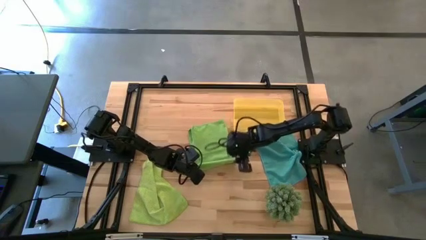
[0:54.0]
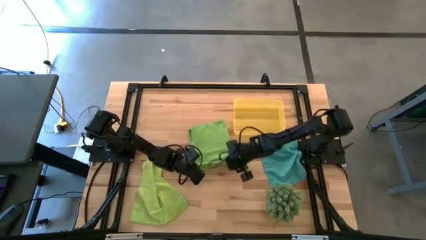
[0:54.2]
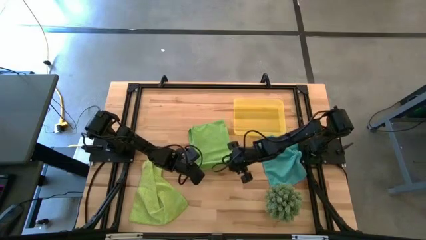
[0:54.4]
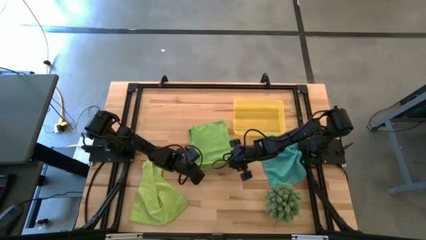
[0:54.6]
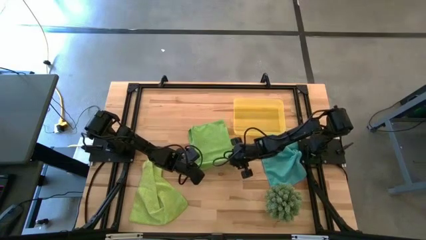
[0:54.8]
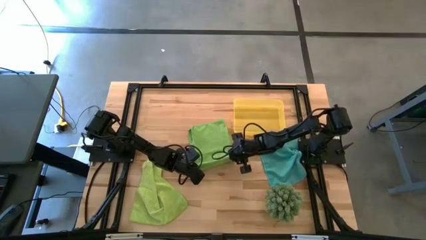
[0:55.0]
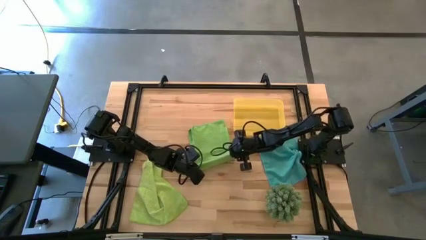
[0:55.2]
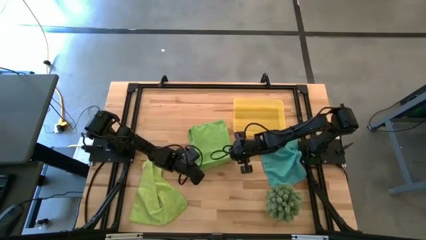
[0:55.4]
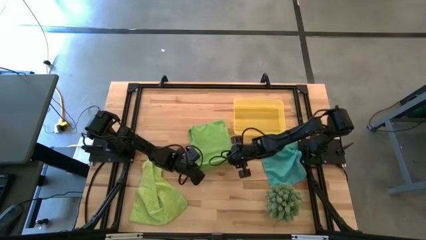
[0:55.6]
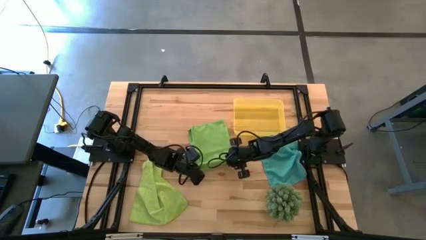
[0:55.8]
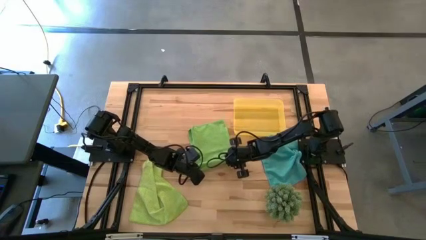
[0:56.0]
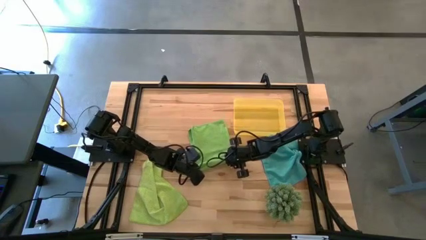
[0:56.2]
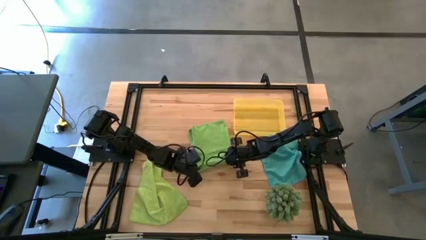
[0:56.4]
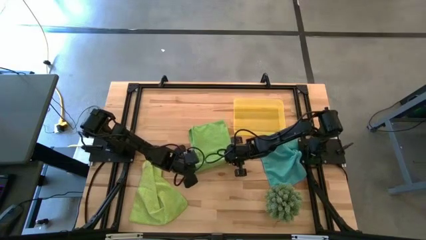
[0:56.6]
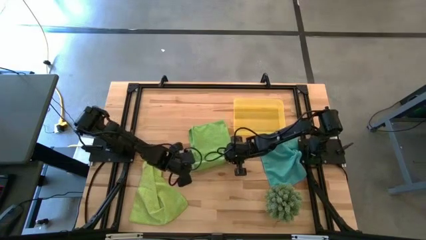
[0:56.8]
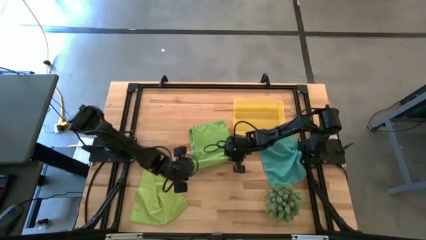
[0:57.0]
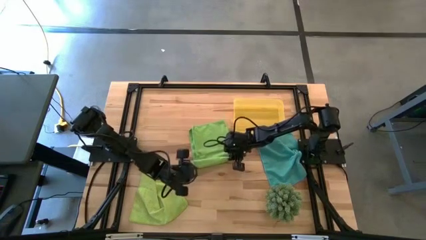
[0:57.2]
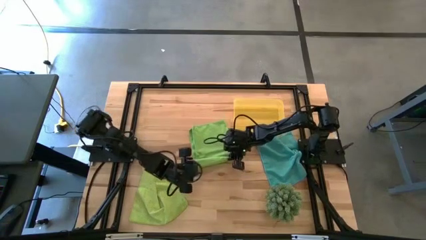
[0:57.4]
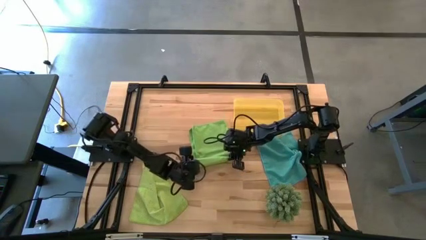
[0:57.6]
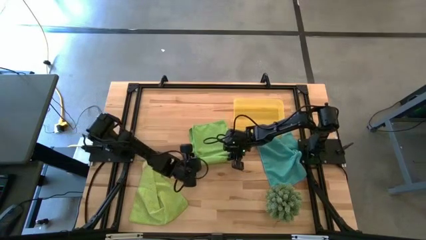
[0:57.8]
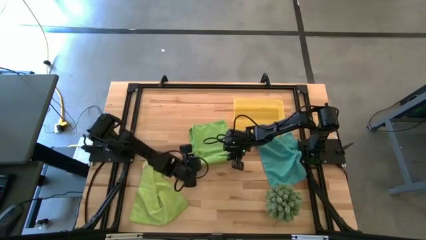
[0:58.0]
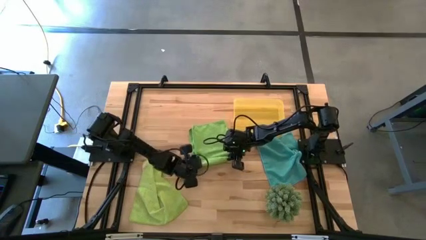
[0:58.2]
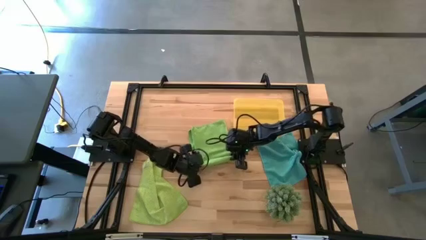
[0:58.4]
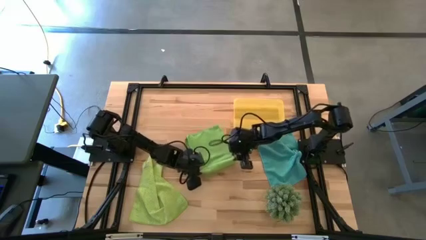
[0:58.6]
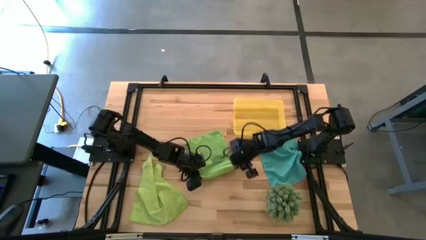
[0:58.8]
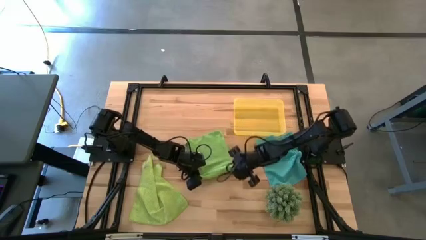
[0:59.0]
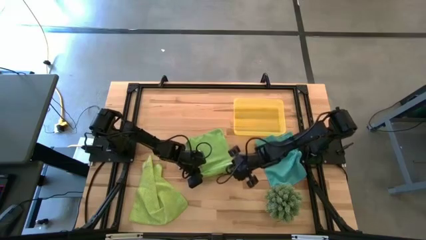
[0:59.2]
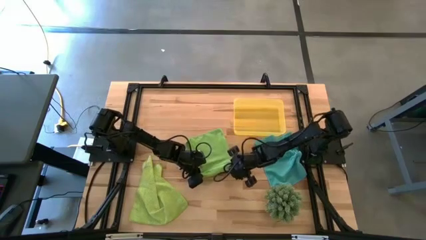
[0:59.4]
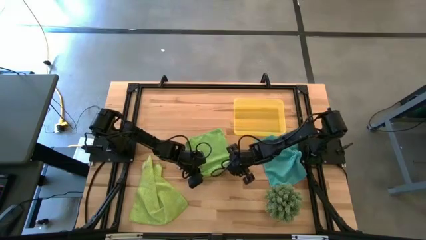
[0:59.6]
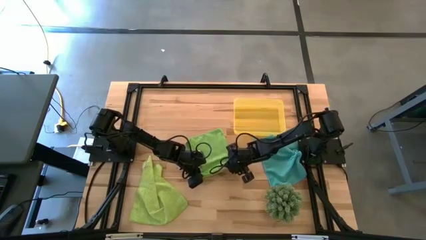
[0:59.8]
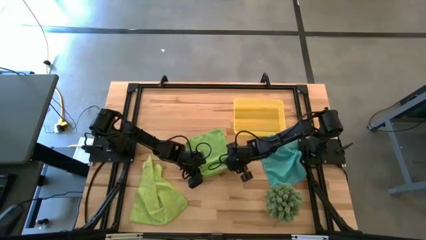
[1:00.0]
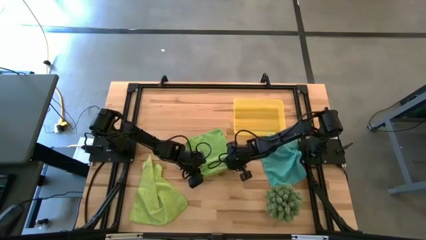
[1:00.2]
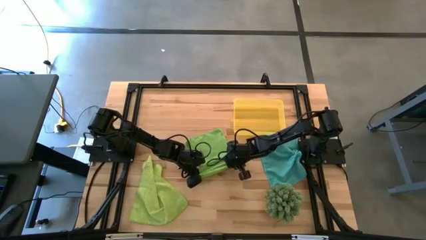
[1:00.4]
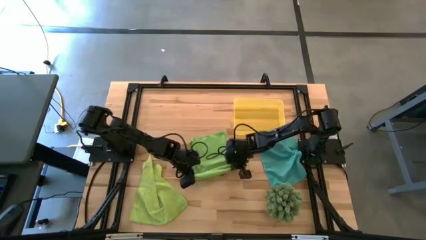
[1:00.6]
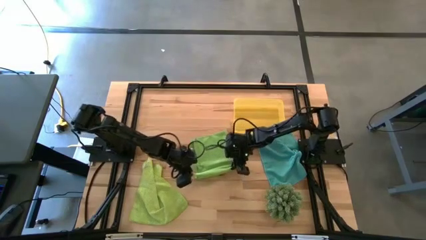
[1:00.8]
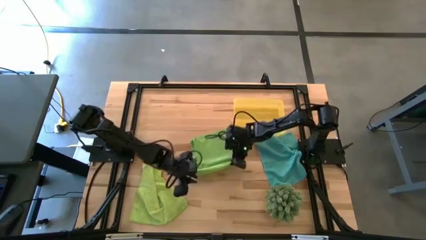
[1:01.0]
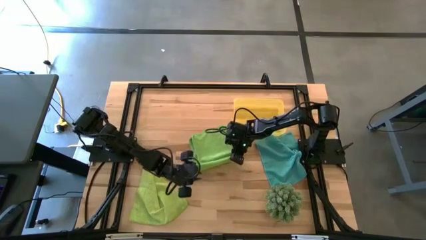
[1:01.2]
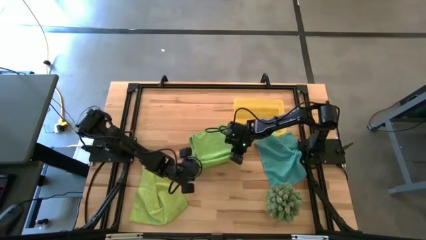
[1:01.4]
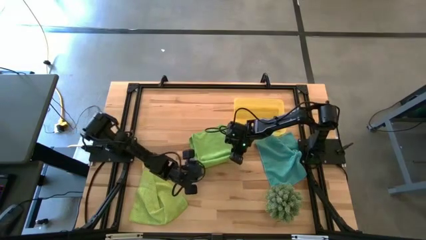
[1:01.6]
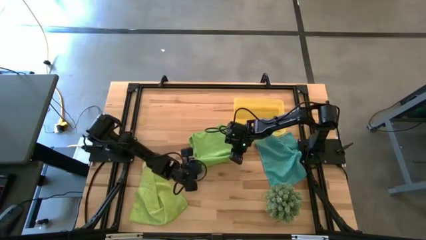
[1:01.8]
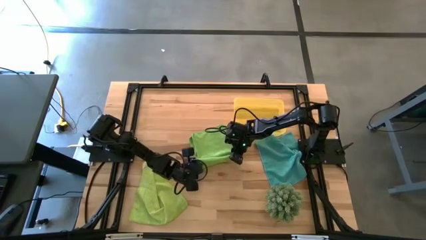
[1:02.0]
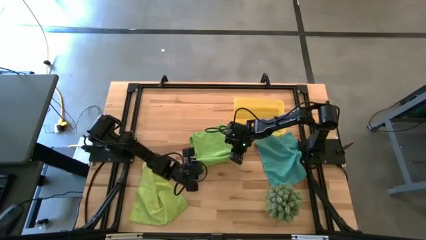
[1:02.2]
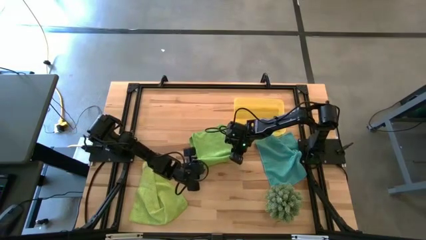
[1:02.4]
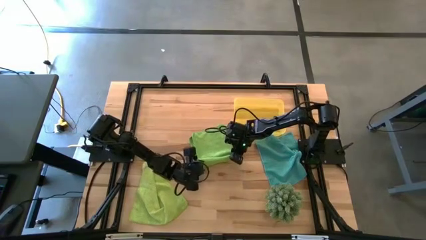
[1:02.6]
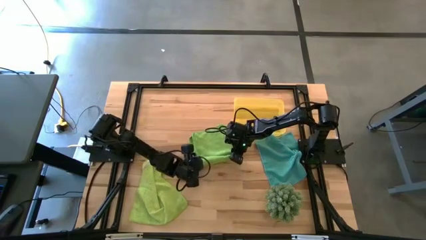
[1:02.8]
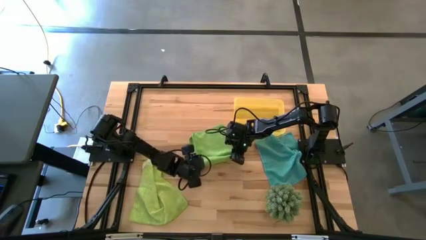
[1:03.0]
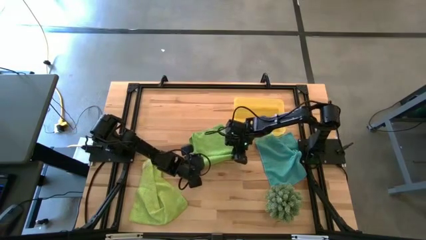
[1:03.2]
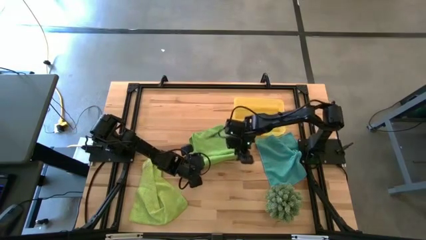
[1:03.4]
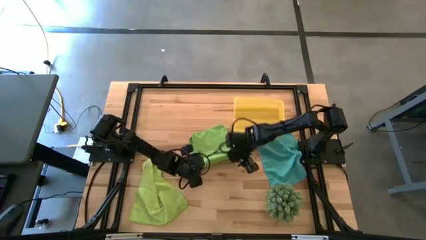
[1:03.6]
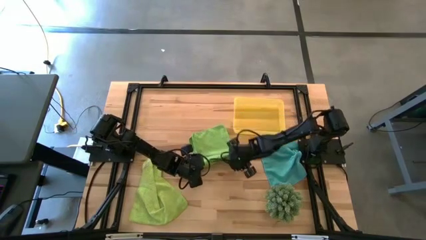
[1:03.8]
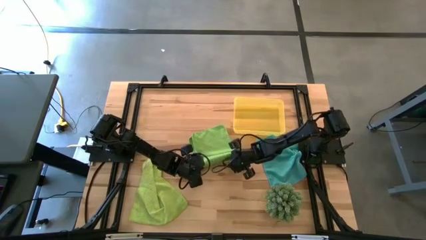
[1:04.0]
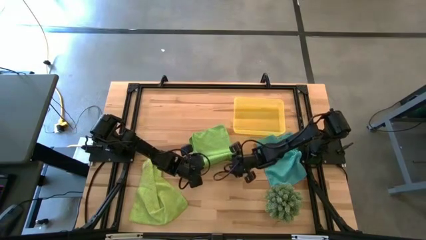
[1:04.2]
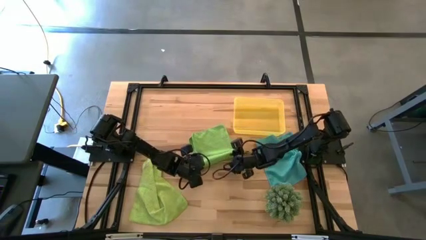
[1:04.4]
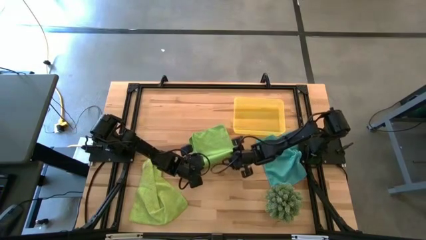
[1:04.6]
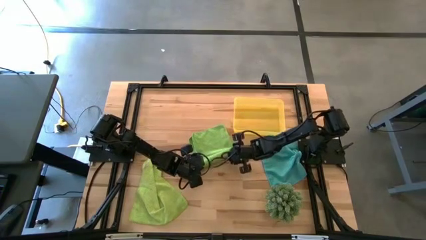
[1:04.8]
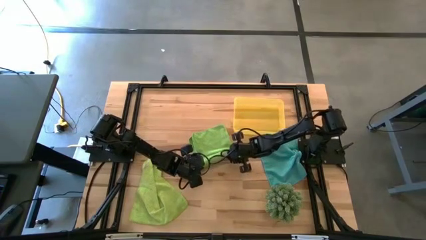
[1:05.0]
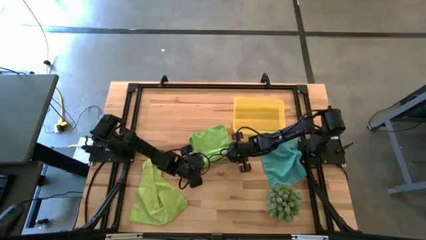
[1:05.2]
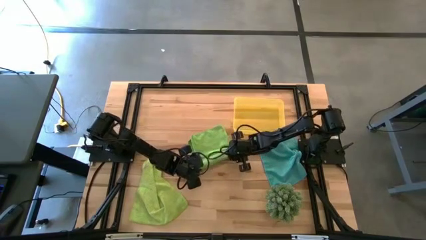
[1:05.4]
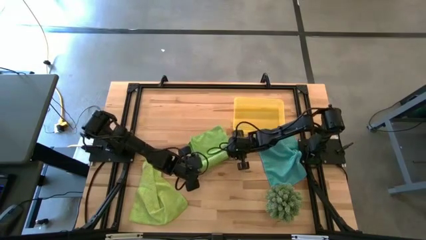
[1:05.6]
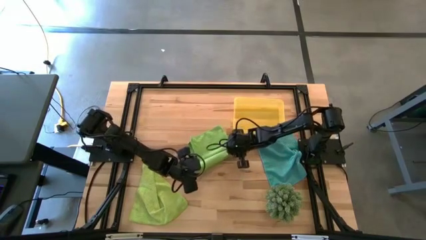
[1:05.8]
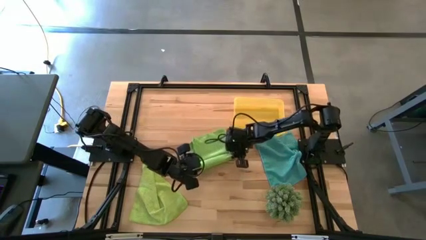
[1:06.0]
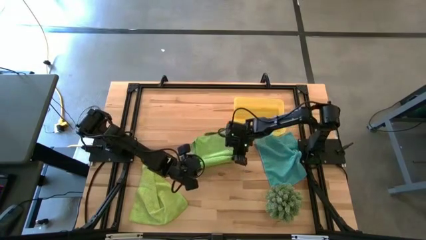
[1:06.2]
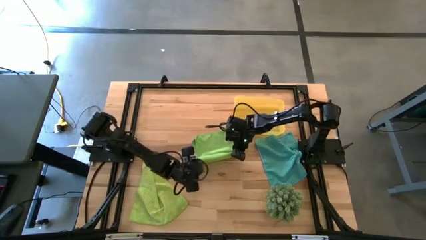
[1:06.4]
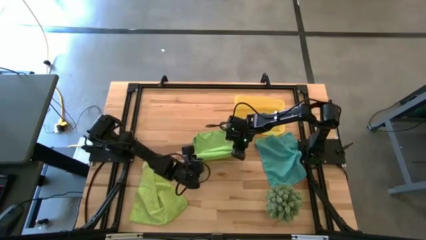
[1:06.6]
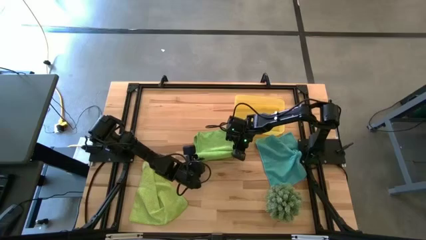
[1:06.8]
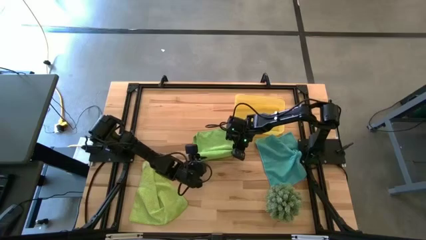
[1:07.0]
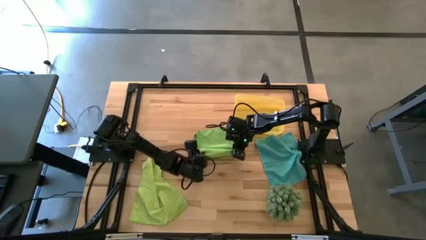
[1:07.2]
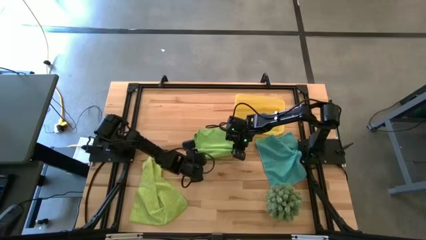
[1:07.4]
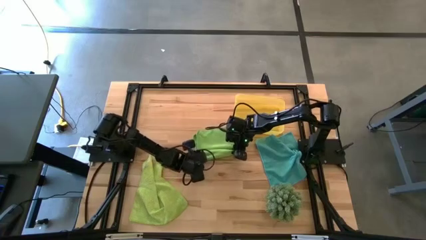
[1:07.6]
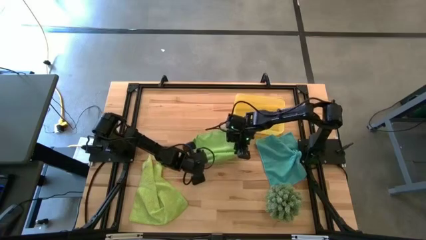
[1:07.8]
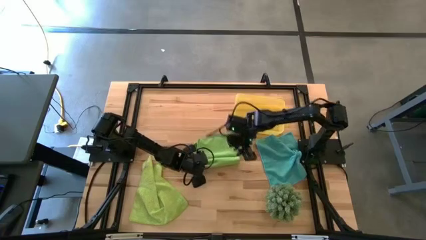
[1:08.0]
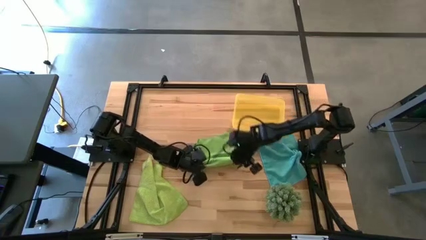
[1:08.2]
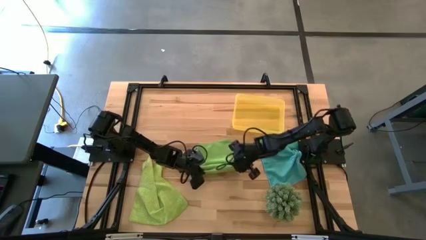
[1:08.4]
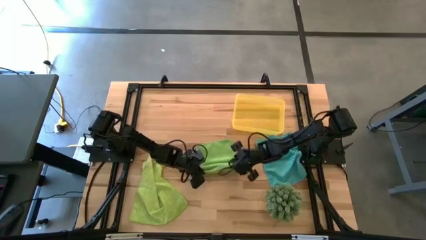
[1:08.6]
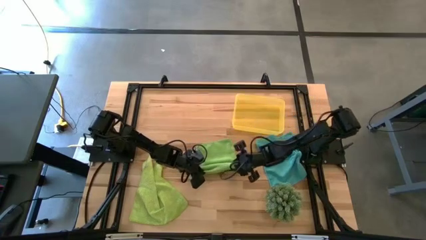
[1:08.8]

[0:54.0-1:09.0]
Task: Roll microfiber towels into tight, uniform cylinder then place into a basket
Roll the top green microfiber towel

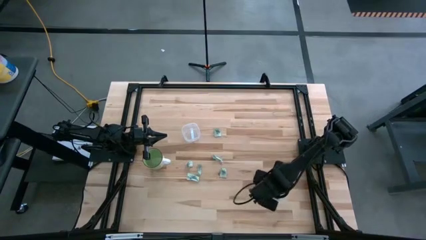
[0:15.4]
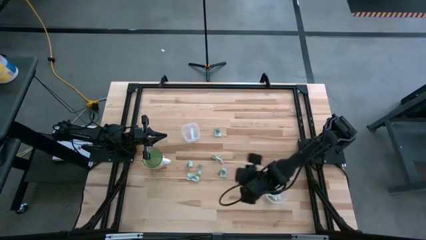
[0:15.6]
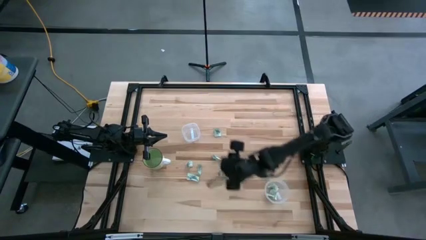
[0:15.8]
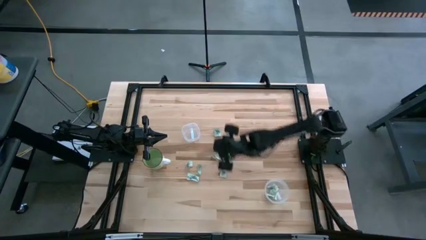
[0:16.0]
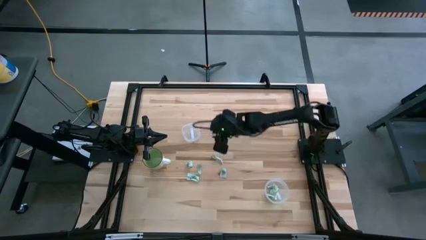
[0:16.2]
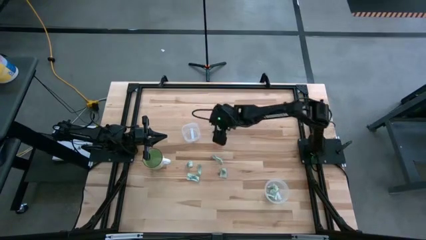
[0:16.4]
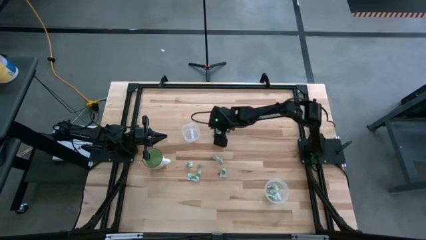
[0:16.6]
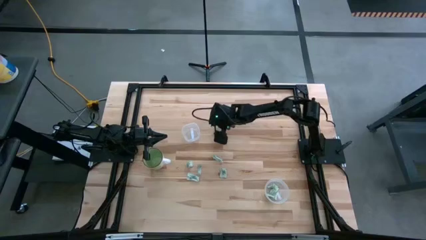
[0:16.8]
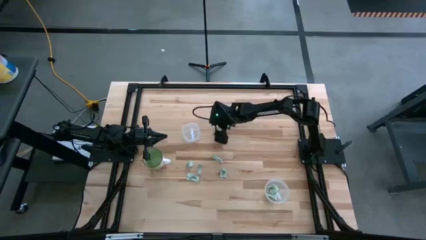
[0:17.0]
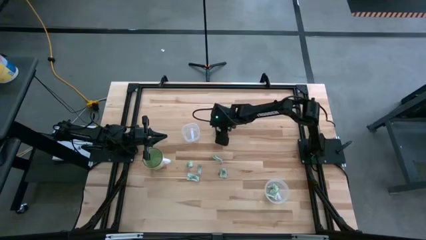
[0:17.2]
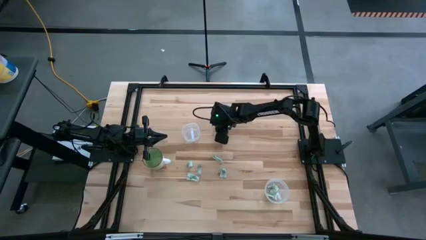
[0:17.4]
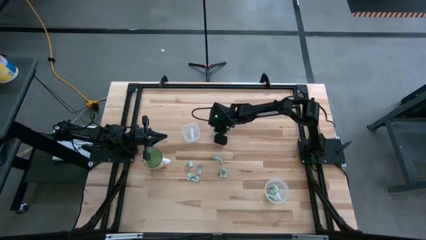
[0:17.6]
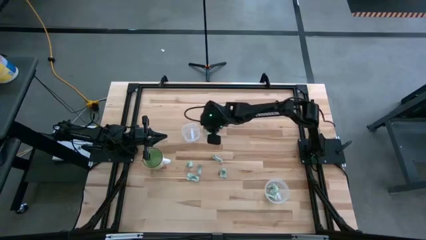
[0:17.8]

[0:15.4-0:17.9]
Task: Pick and place items into bin
Put the green stevia packet into the top transparent bin
